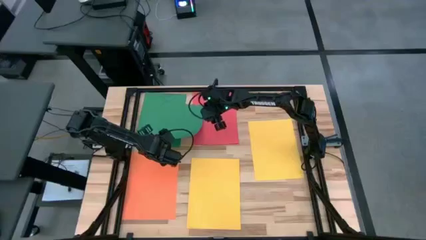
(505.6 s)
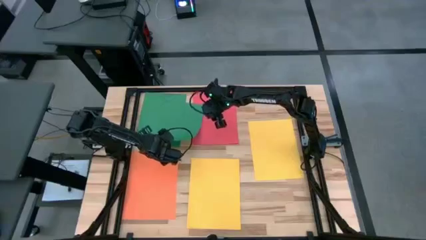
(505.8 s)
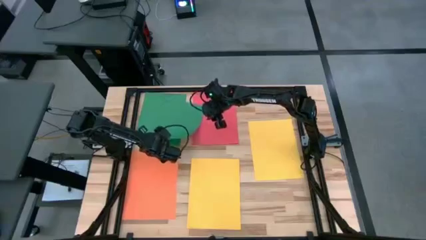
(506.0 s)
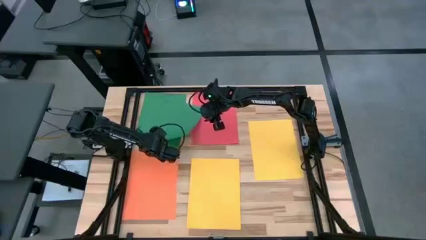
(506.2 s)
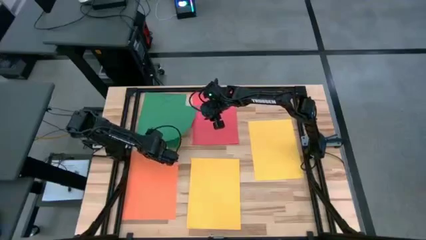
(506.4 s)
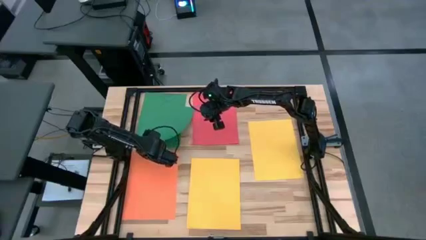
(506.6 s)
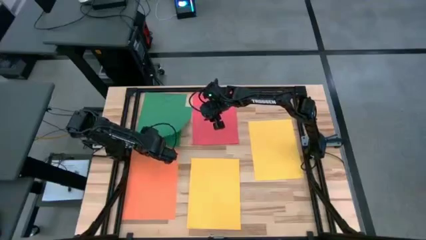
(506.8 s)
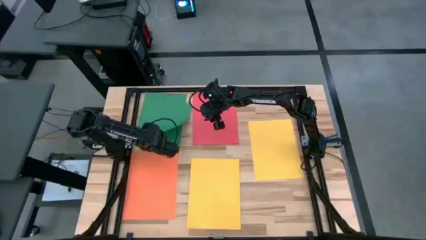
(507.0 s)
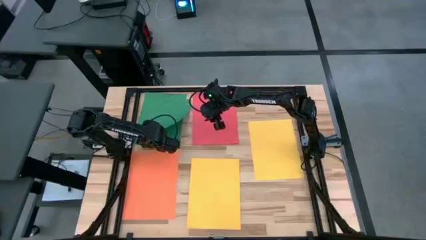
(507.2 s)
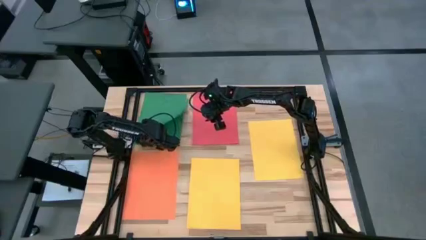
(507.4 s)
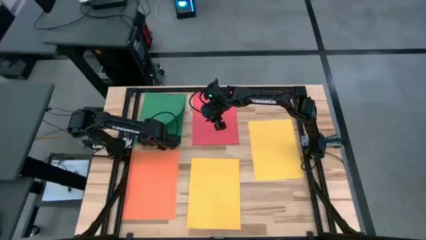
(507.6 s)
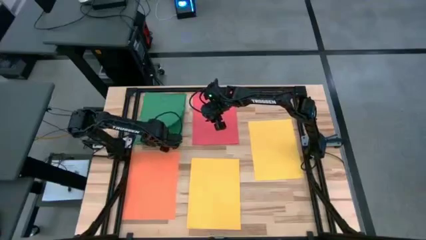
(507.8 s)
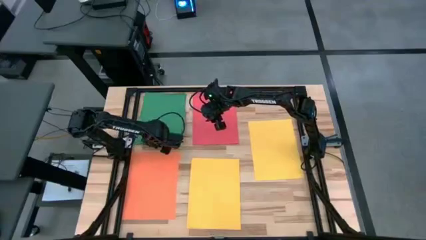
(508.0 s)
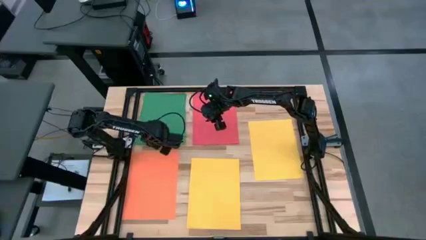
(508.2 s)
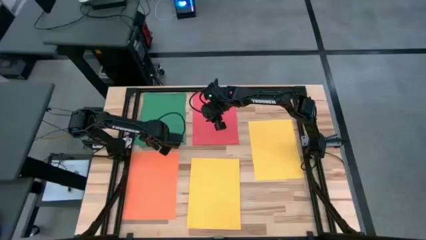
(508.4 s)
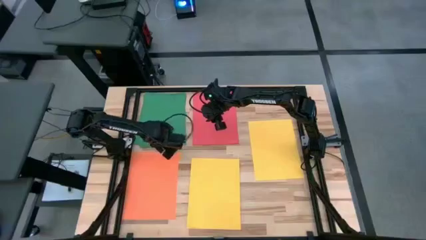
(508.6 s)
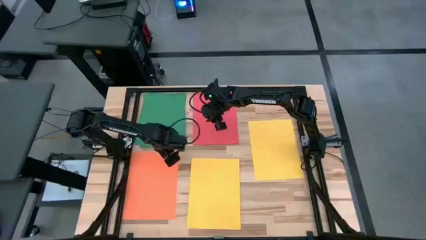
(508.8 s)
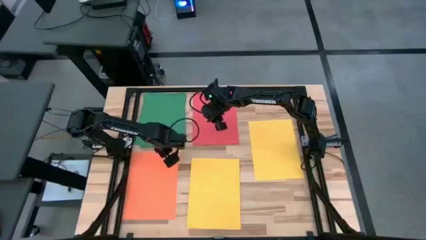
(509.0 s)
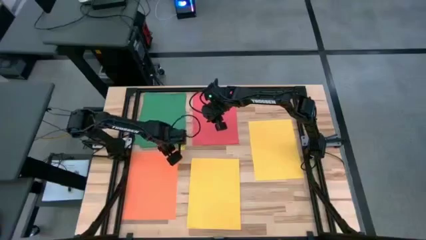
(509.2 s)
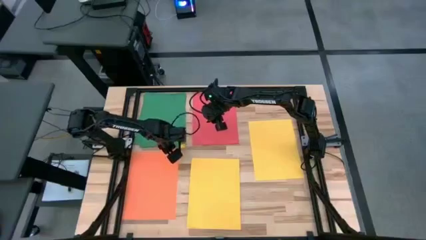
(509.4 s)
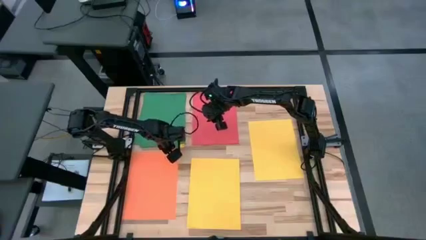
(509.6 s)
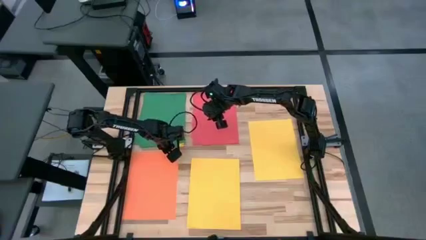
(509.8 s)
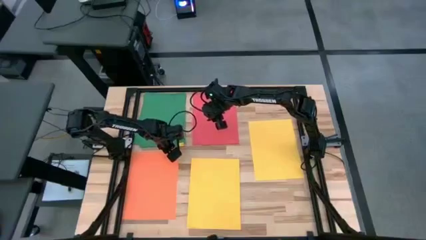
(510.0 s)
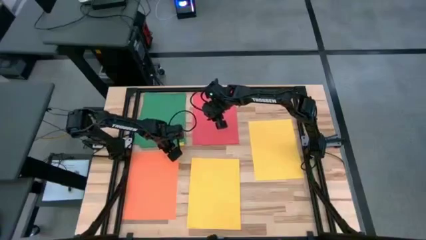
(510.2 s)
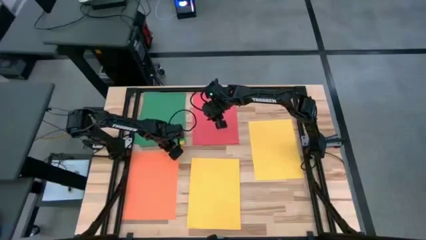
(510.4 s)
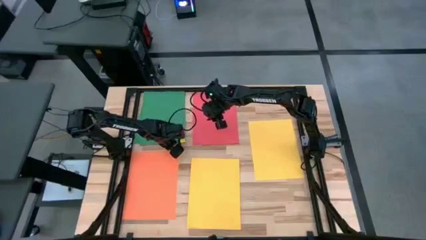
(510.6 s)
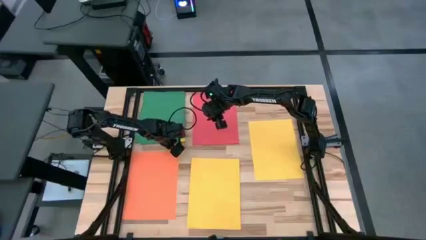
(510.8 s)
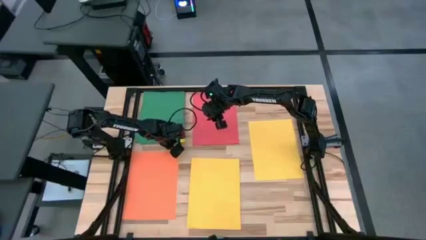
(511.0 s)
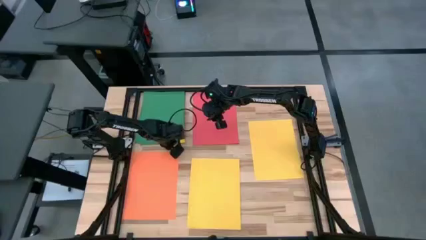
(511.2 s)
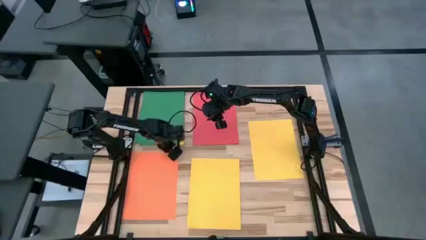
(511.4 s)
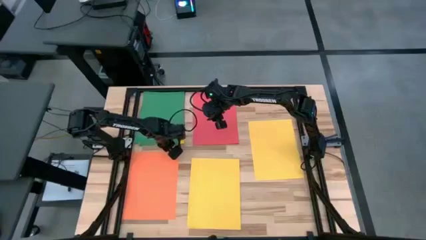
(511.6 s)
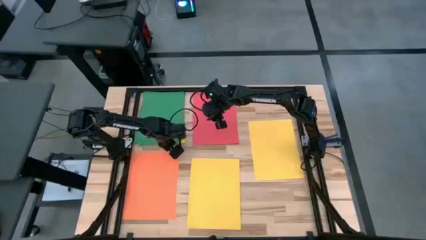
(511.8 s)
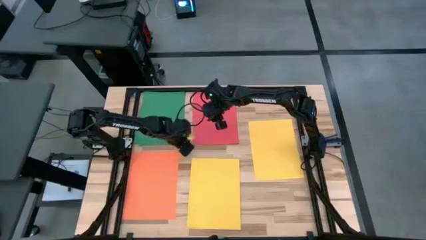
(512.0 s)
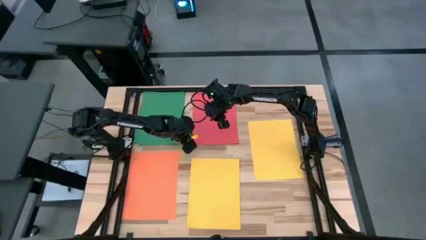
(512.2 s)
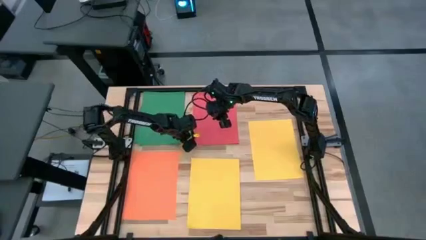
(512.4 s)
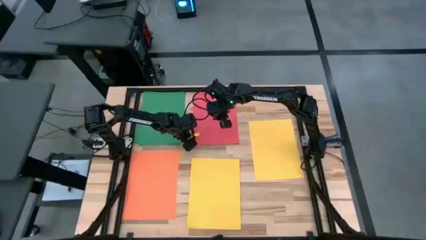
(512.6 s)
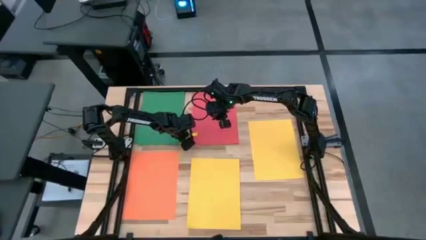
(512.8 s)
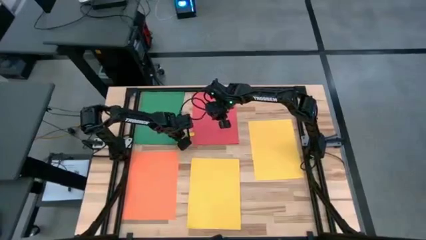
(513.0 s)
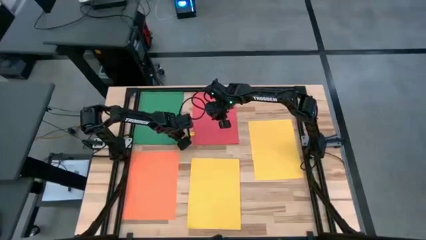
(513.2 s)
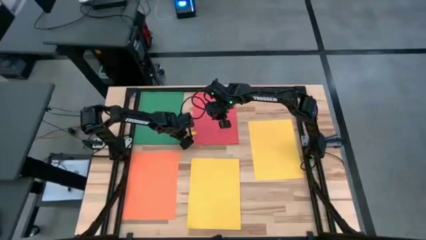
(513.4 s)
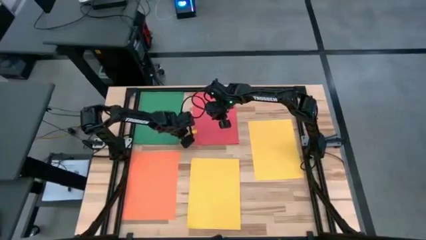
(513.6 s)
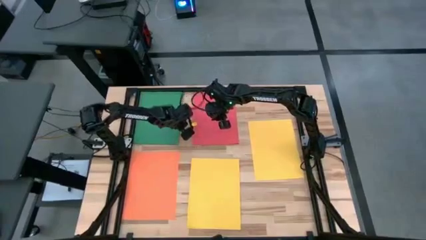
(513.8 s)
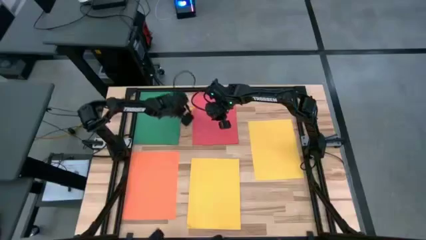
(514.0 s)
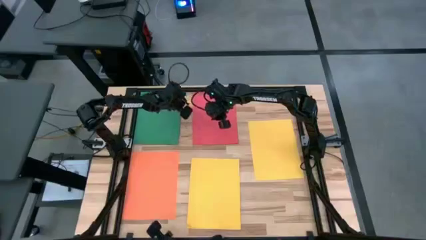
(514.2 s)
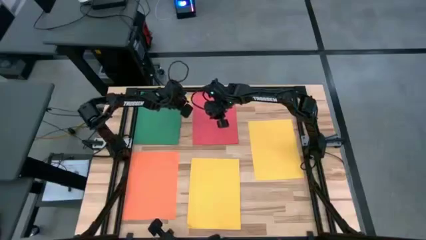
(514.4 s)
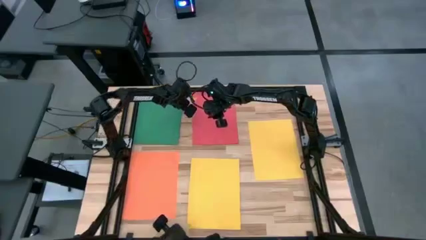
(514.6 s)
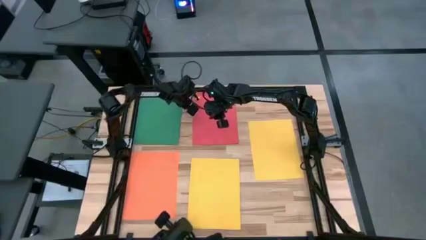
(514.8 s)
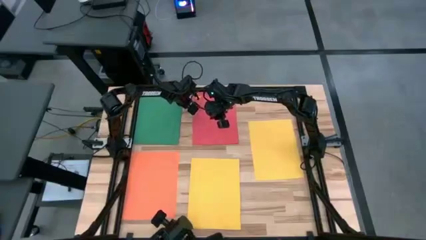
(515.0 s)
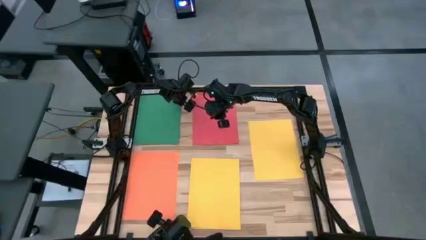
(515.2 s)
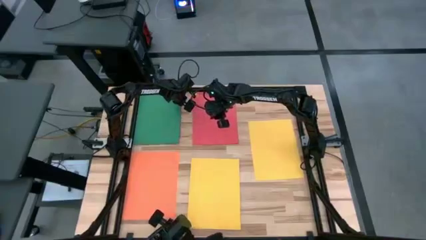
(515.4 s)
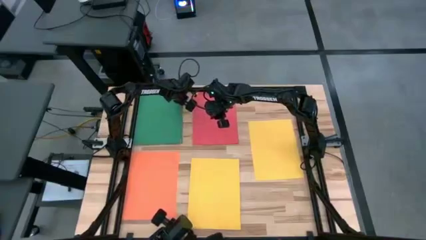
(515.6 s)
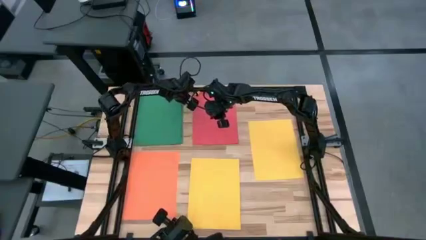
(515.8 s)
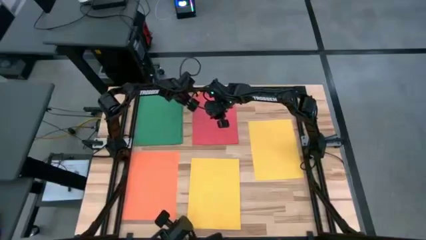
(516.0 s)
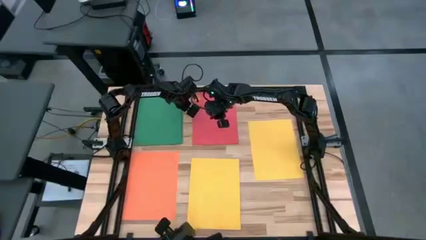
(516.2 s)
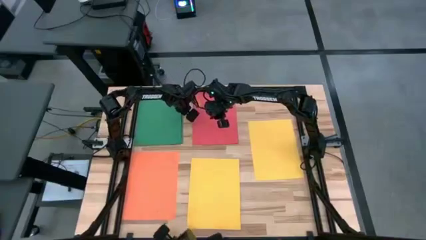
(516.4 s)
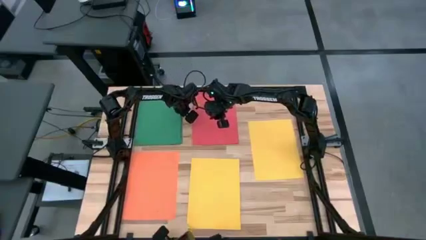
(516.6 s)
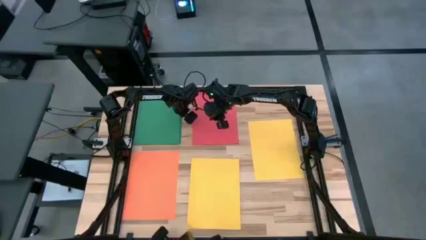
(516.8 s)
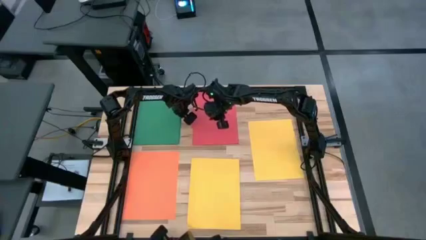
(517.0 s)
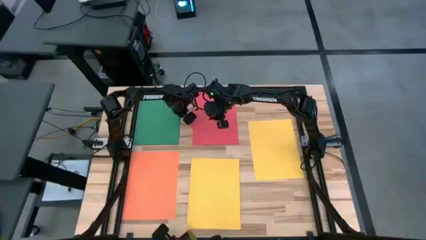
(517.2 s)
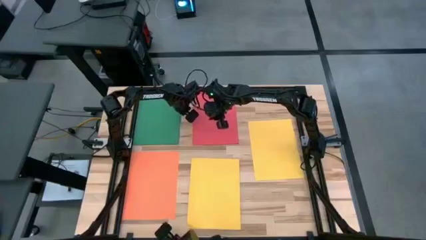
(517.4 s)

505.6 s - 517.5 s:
Task: Organize paper
Stack the green paper on top of the green paper
